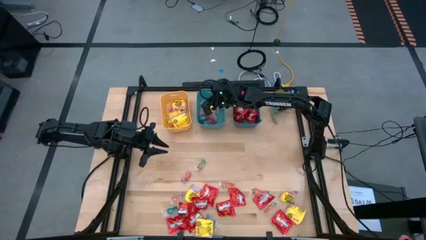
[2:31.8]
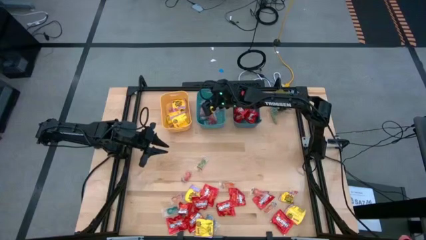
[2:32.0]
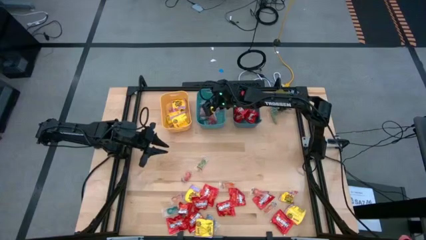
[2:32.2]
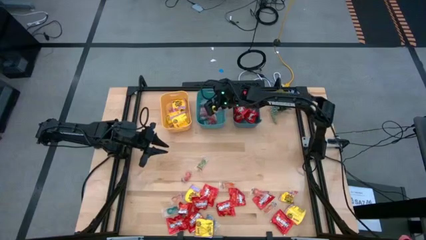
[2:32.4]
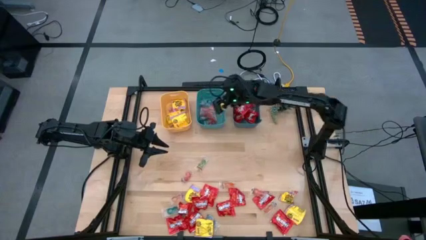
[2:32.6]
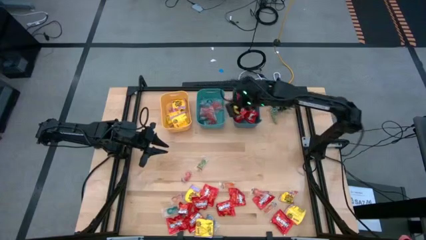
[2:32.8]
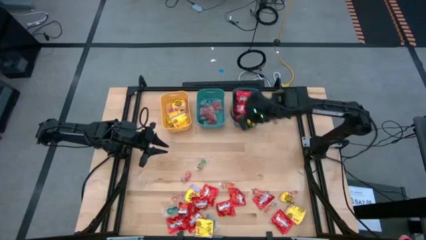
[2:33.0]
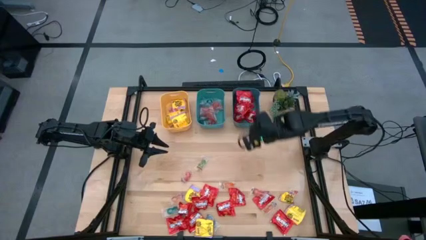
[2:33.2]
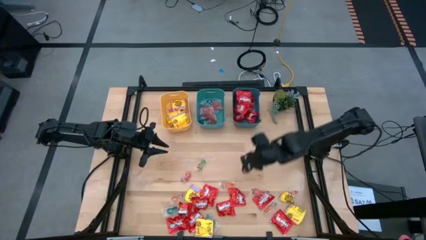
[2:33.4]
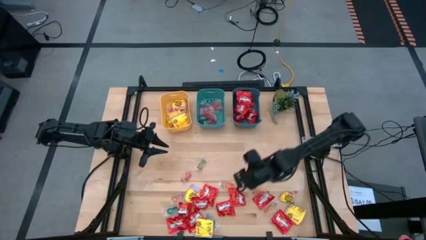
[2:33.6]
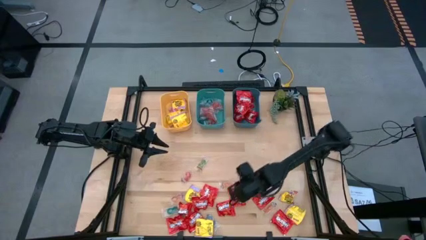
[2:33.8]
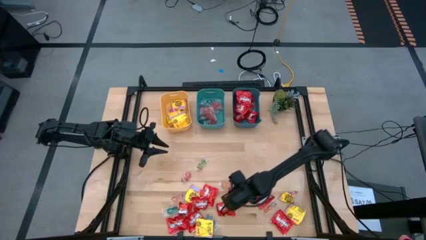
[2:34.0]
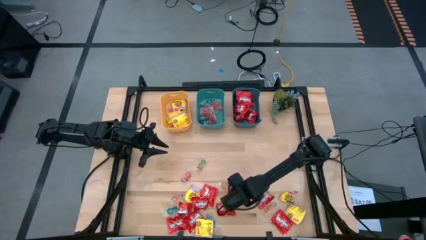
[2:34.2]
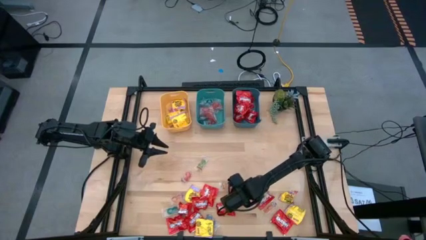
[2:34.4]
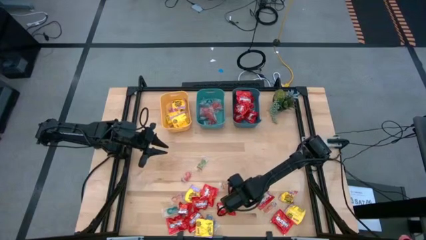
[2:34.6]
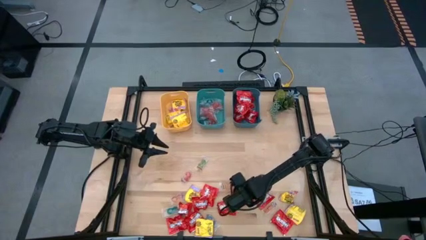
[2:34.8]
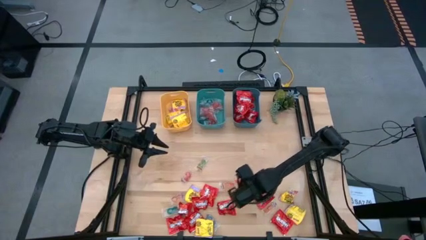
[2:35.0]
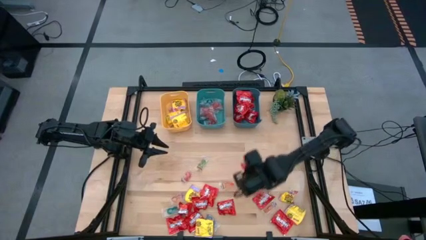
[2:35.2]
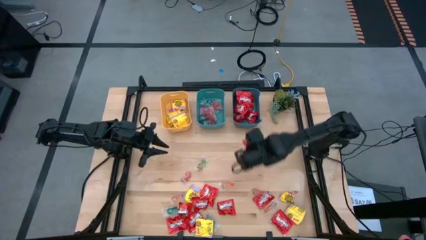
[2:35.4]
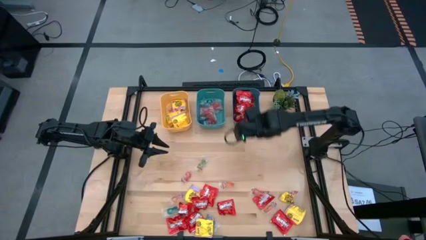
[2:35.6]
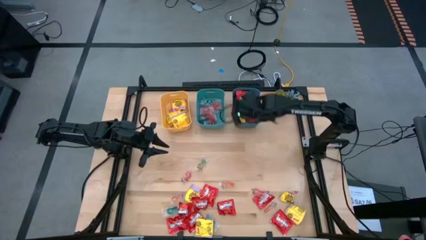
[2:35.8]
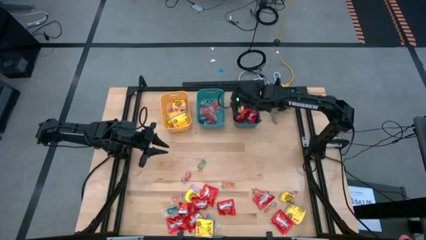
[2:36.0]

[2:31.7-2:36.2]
Task: Sort candy
Put the red candy into the blue bin

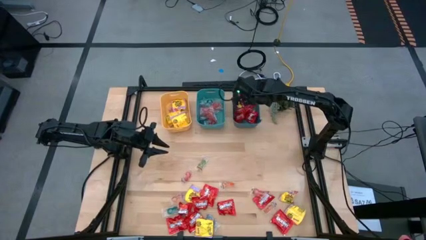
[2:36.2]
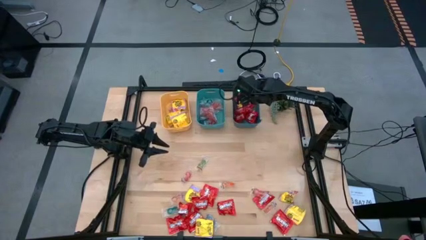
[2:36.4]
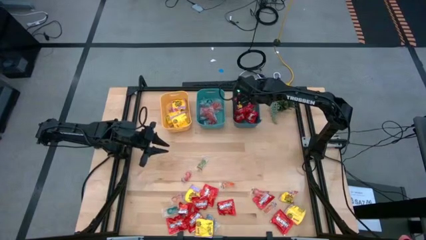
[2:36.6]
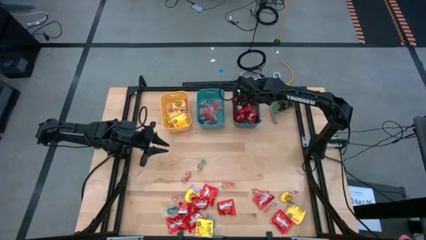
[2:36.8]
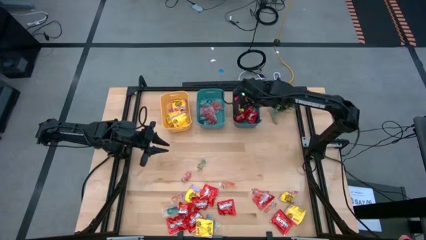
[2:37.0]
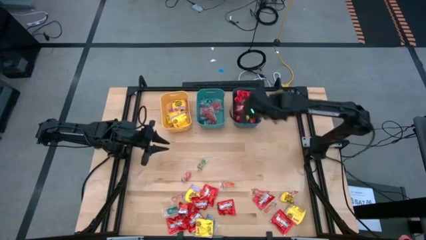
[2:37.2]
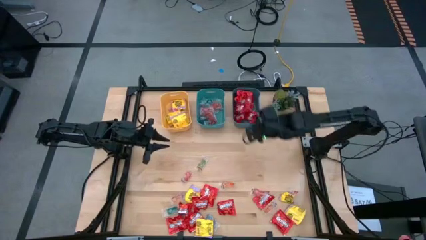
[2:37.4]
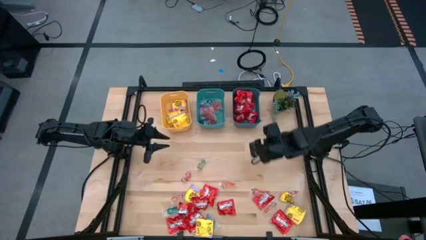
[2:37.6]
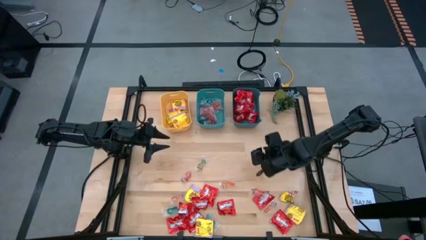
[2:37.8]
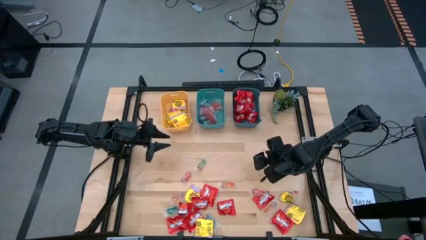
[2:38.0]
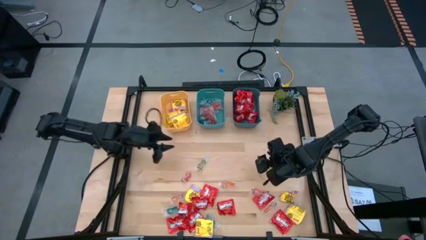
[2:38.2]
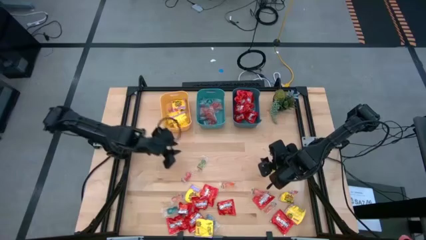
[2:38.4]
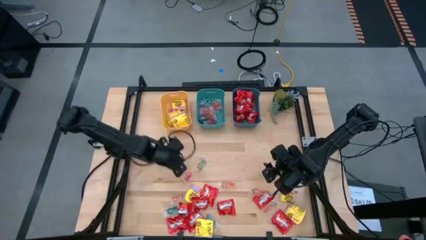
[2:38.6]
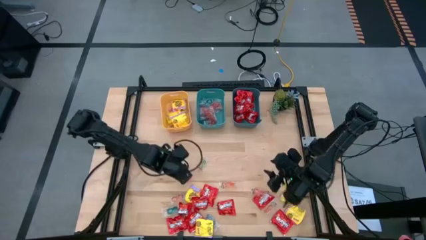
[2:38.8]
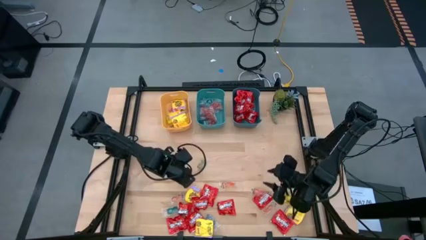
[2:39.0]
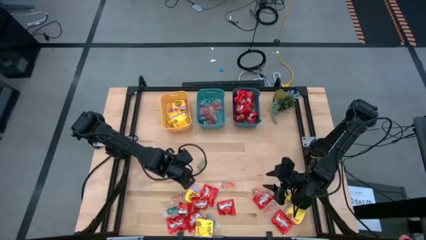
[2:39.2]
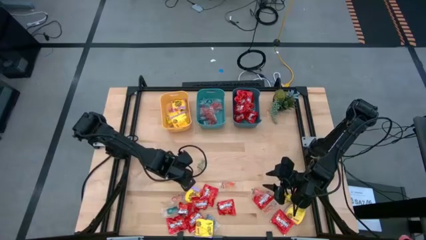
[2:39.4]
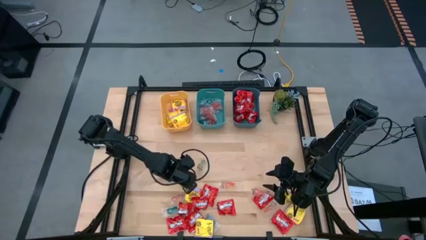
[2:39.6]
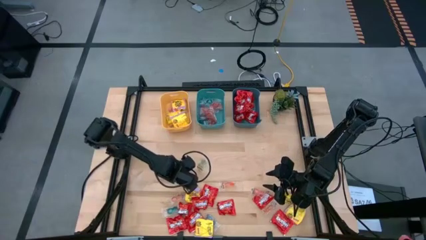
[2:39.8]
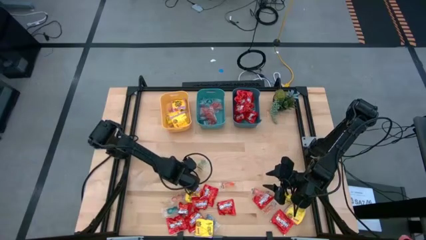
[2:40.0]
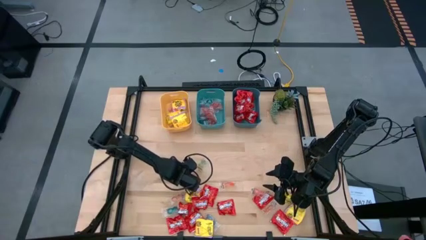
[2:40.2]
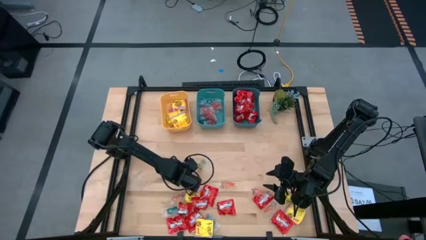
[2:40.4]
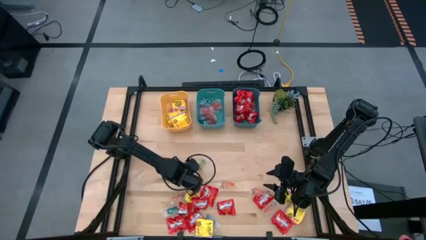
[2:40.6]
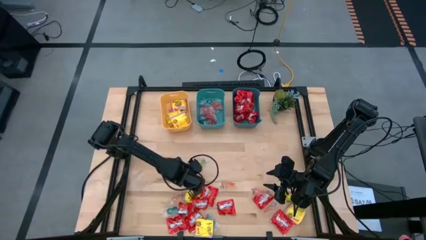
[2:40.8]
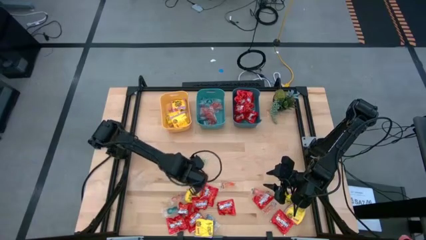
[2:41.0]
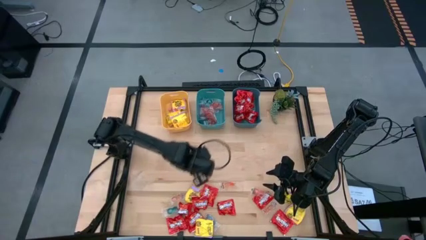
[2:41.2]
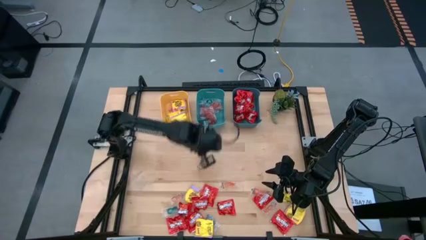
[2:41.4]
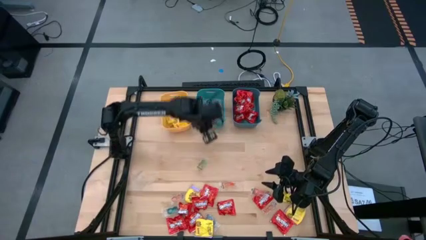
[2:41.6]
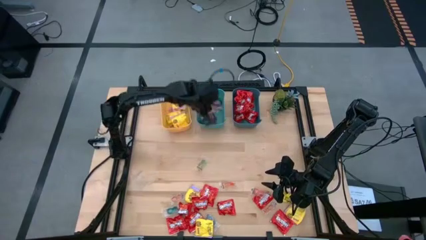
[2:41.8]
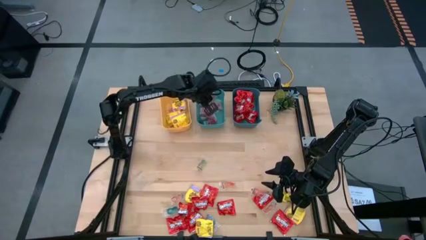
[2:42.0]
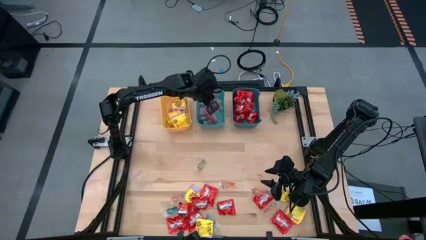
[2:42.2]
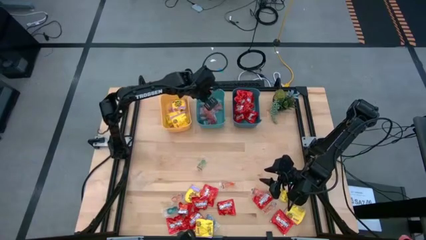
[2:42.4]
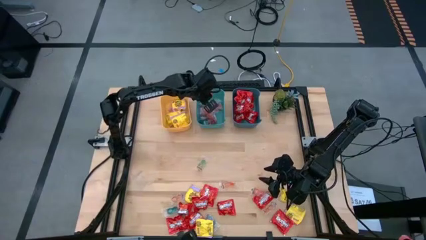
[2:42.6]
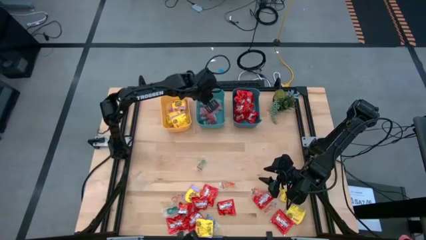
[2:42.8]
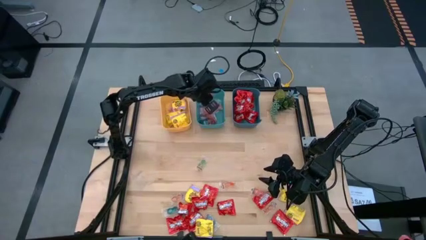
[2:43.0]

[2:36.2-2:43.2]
Put the orange gummy candy into the green bin

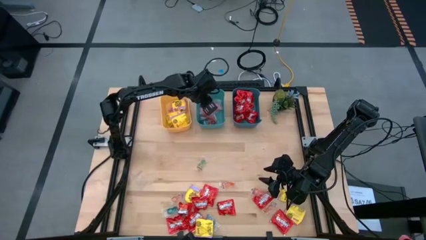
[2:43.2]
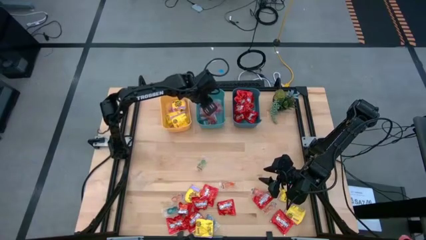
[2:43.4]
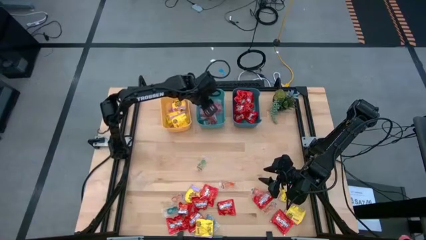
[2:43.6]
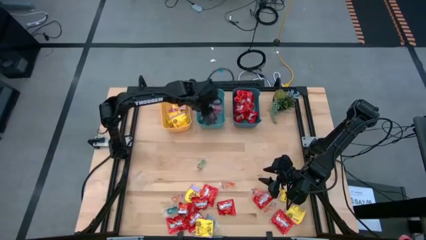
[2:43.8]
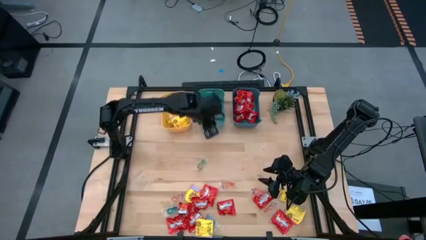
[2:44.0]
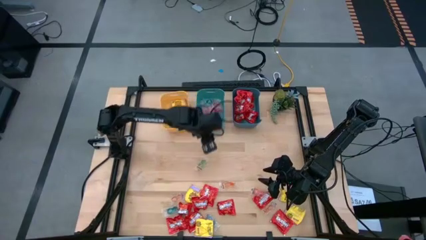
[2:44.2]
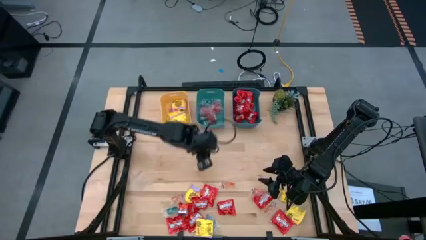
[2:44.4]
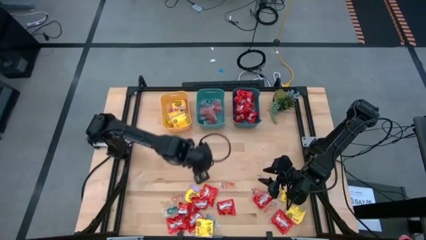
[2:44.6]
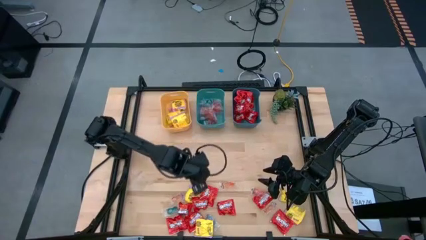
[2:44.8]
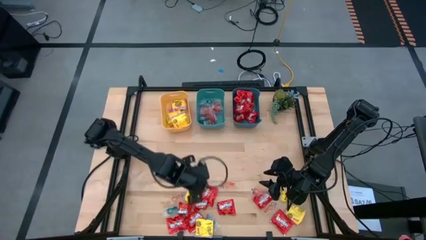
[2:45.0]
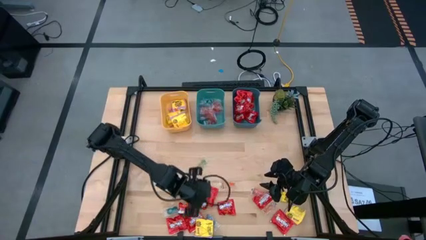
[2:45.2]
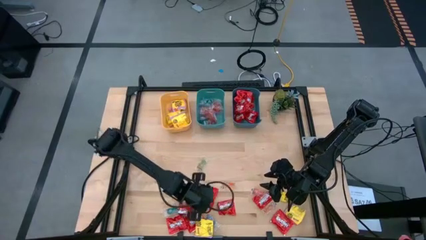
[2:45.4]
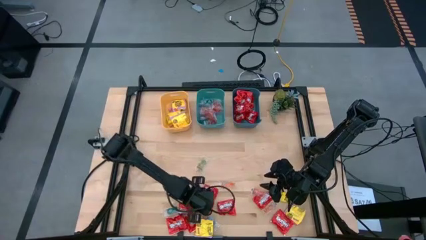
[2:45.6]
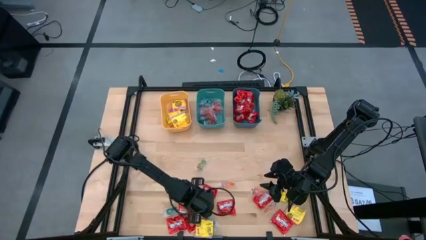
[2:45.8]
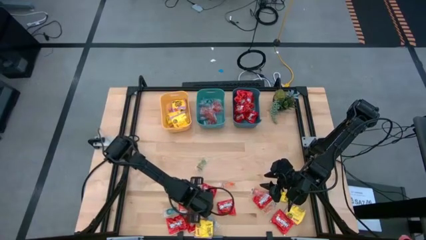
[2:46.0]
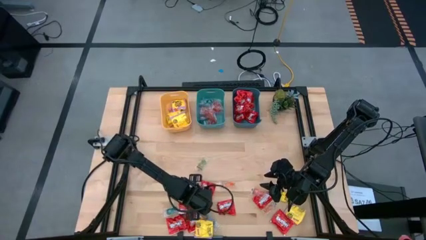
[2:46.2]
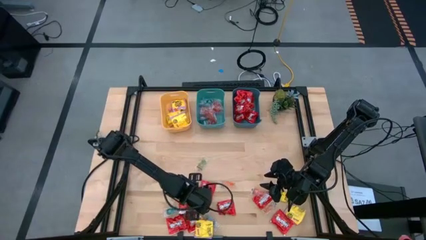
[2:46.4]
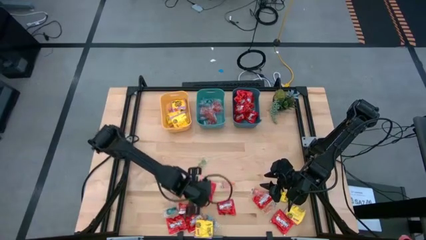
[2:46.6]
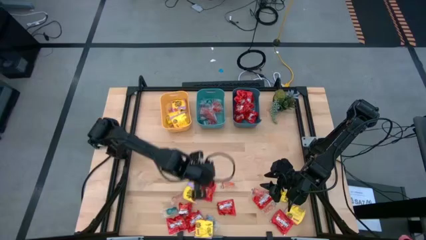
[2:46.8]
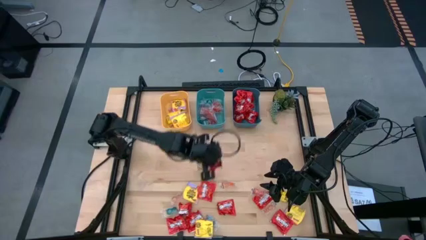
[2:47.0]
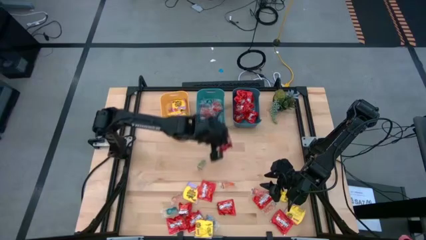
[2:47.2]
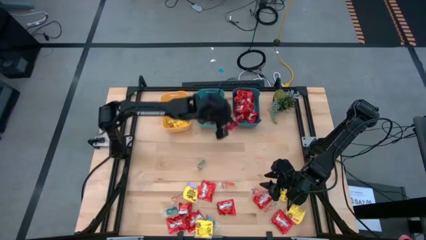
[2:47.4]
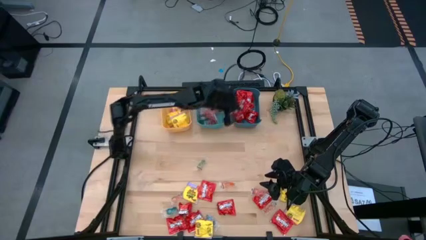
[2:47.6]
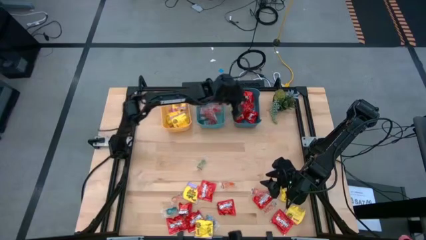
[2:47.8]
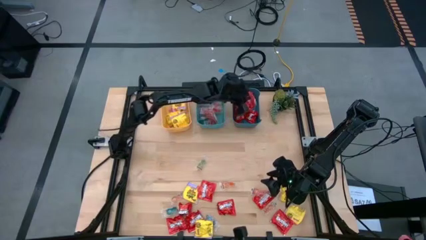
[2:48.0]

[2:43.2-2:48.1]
Put the red candy into the blue bin
